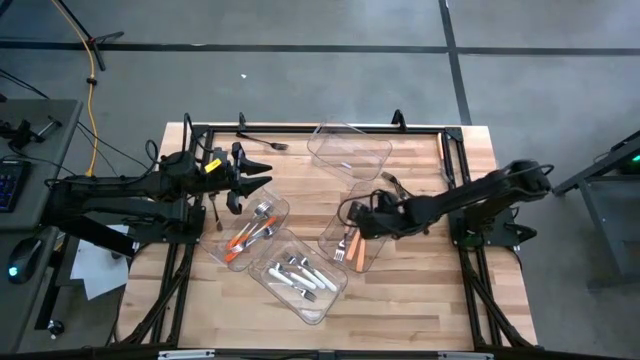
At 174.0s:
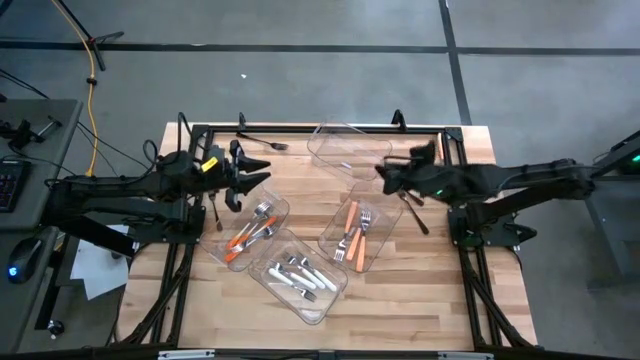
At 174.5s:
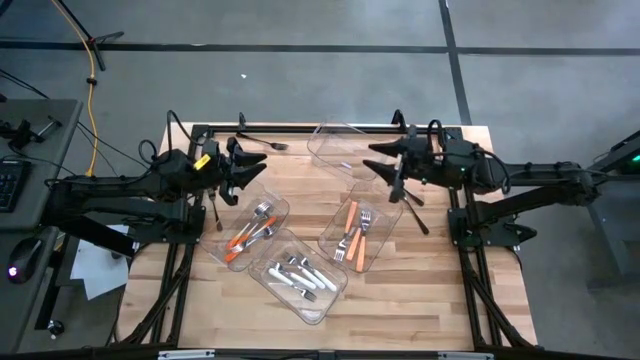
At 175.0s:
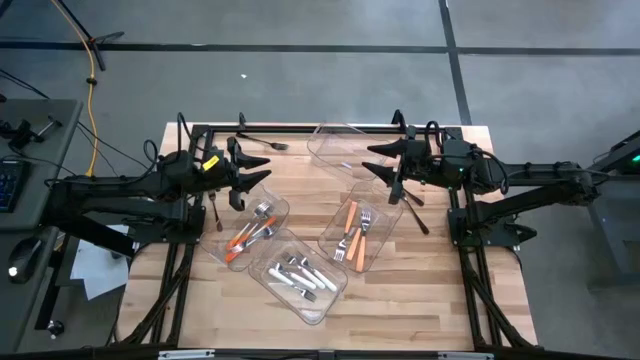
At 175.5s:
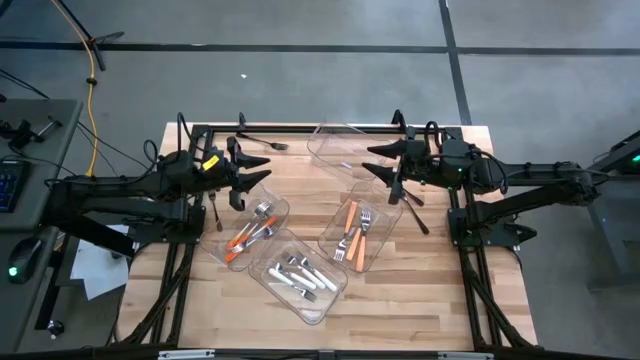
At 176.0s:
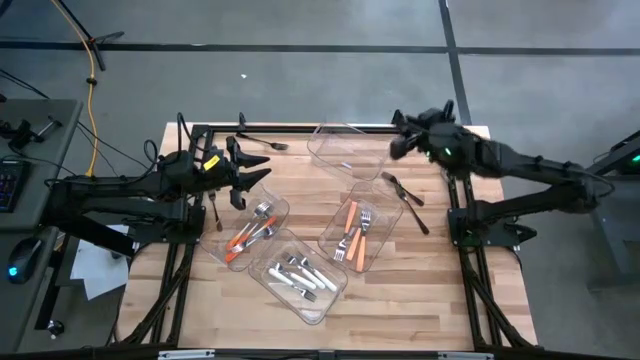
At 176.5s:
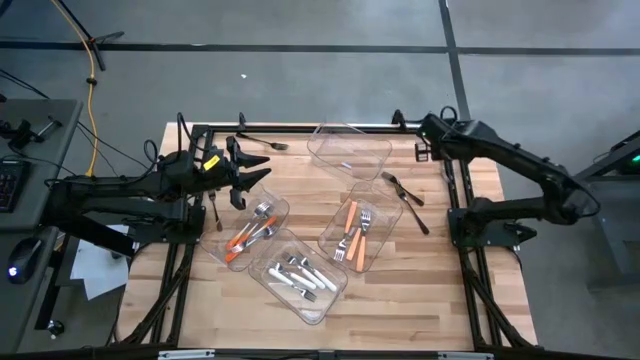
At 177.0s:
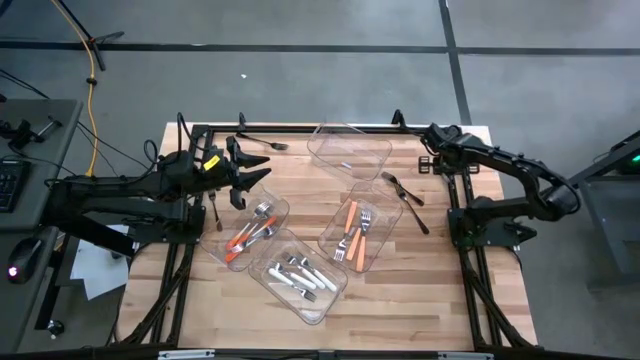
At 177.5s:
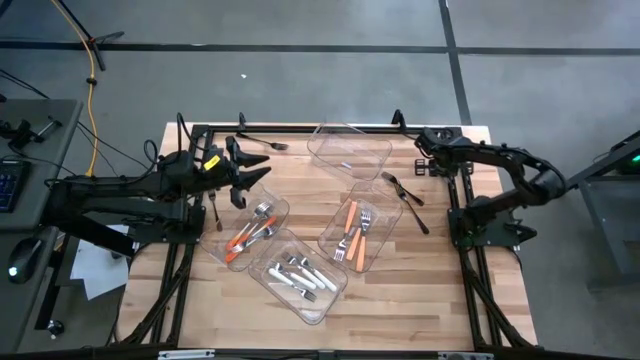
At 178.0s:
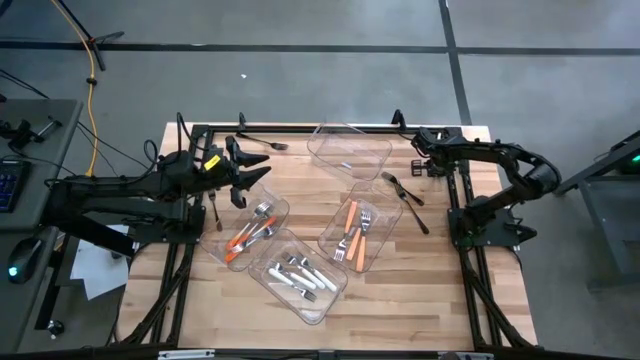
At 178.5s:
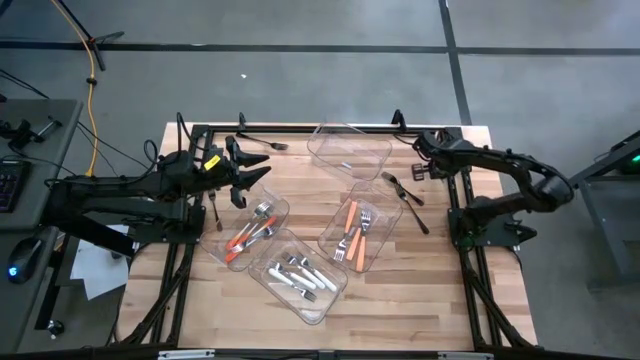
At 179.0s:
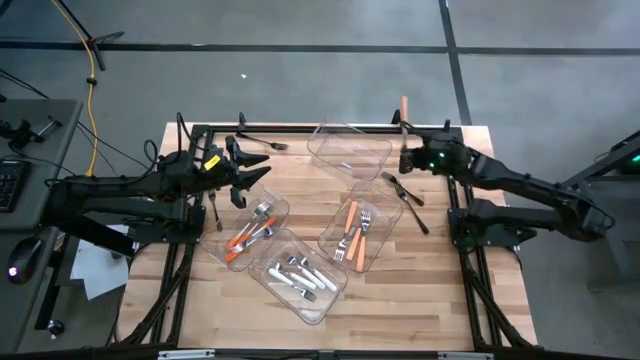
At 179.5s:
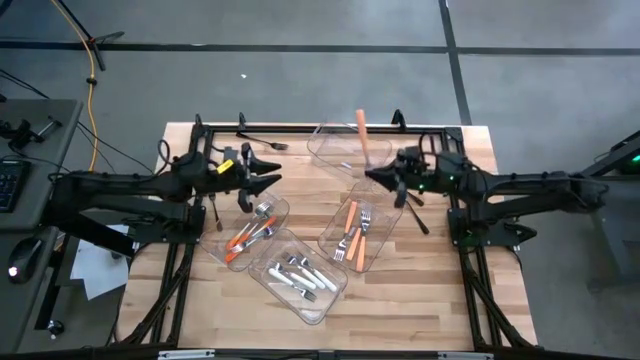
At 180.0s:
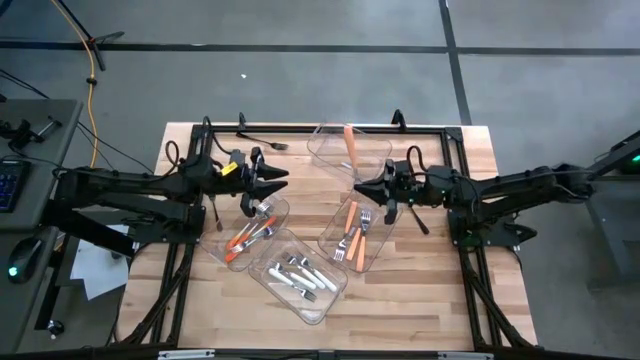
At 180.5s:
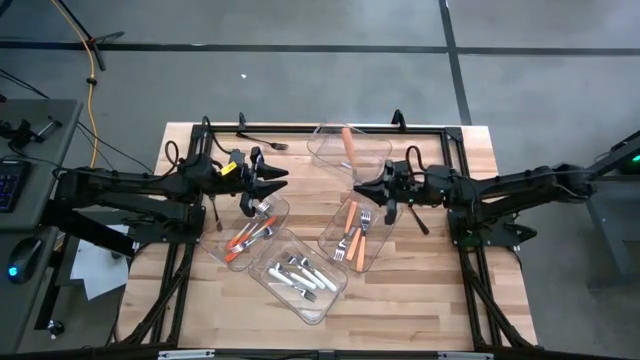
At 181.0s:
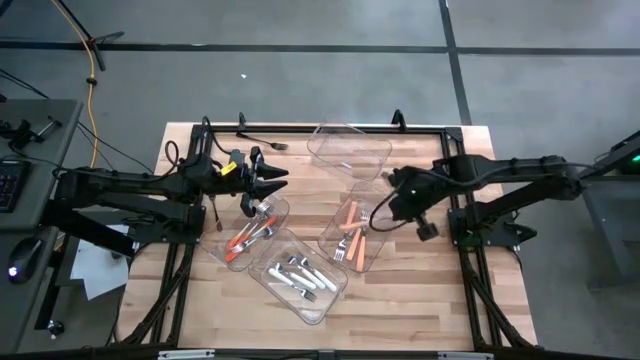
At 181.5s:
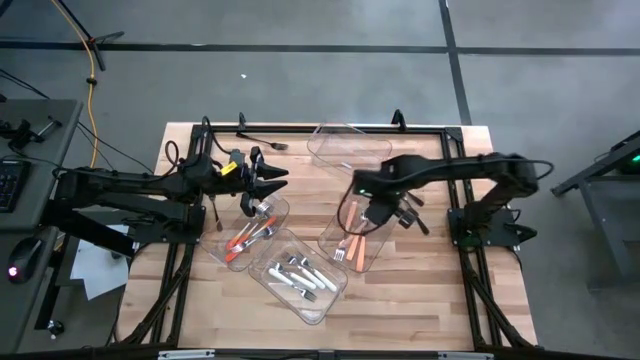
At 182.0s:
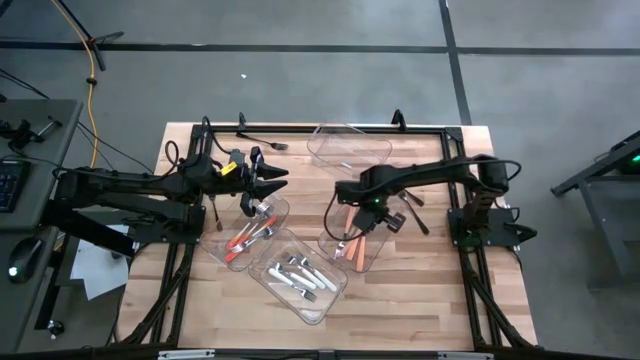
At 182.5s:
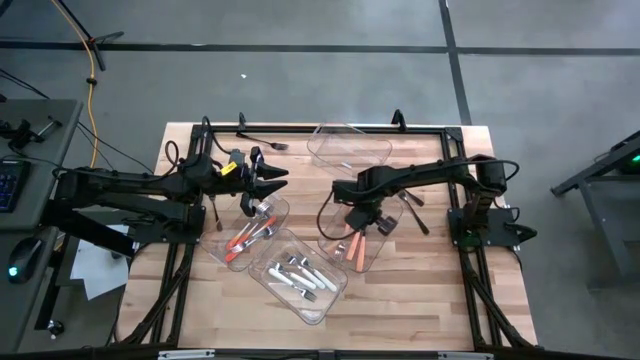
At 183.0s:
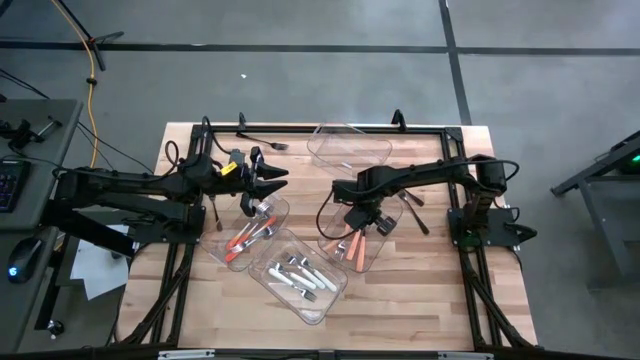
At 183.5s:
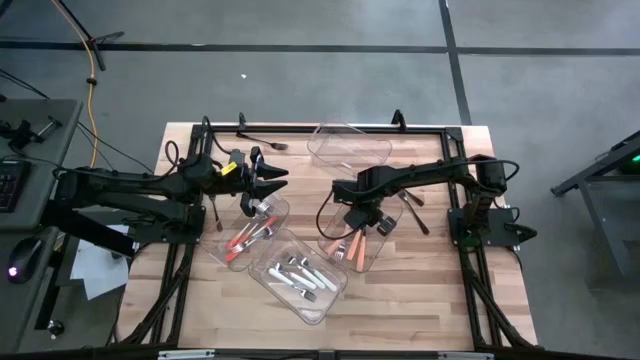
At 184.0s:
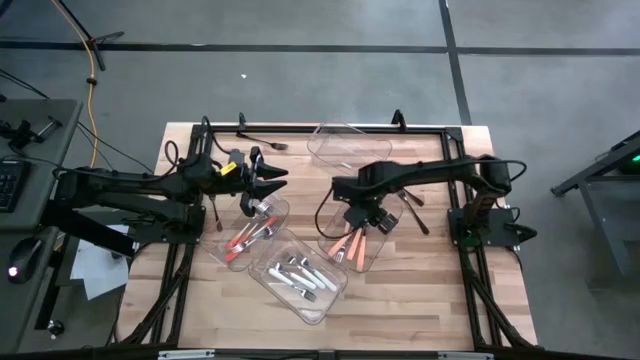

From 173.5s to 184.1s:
Task: Sort silverware by color (type)
Put the light orange fork into the middle right transparent bin

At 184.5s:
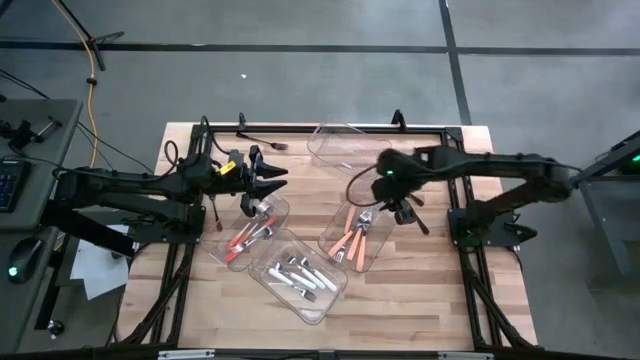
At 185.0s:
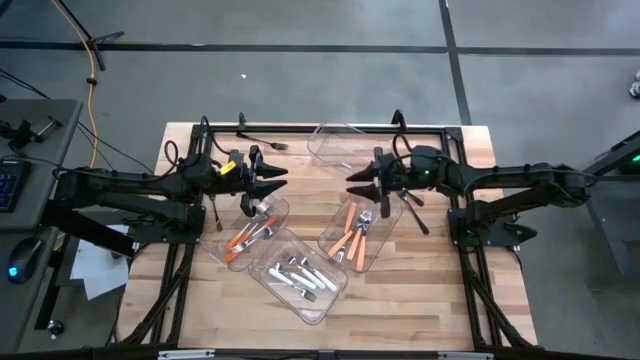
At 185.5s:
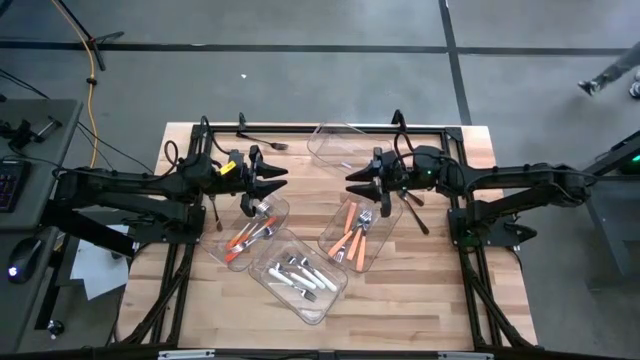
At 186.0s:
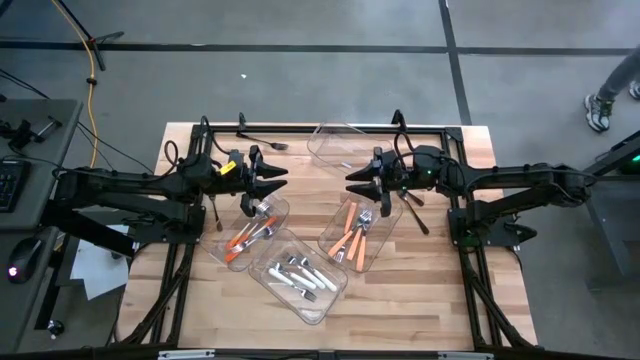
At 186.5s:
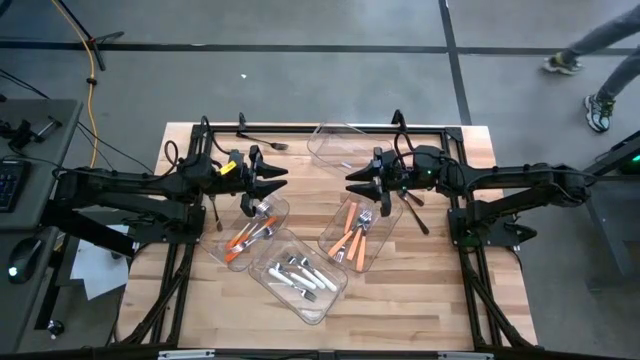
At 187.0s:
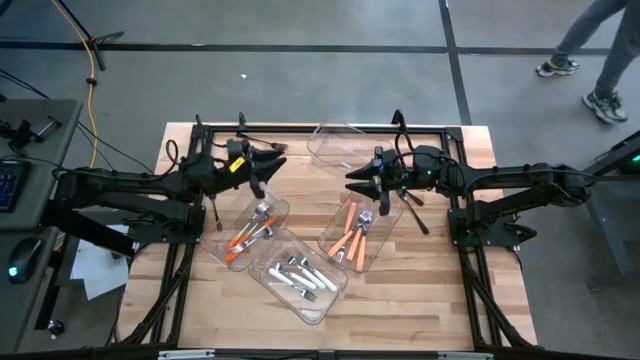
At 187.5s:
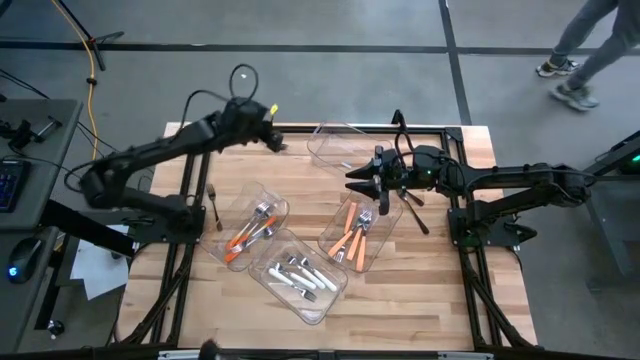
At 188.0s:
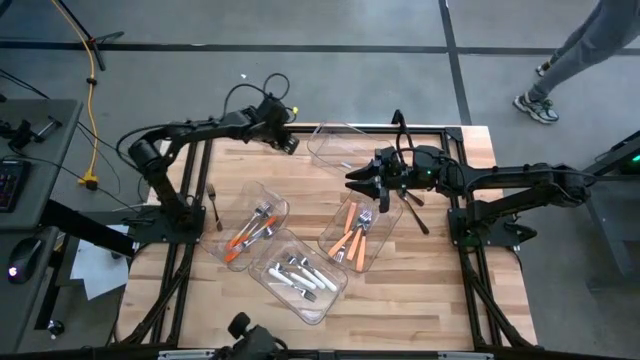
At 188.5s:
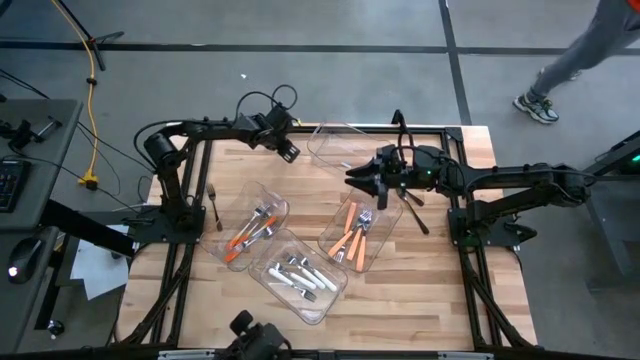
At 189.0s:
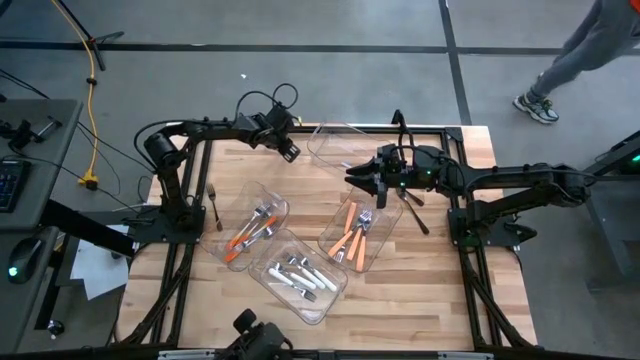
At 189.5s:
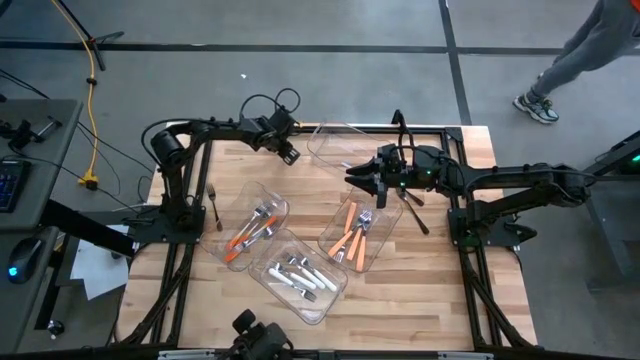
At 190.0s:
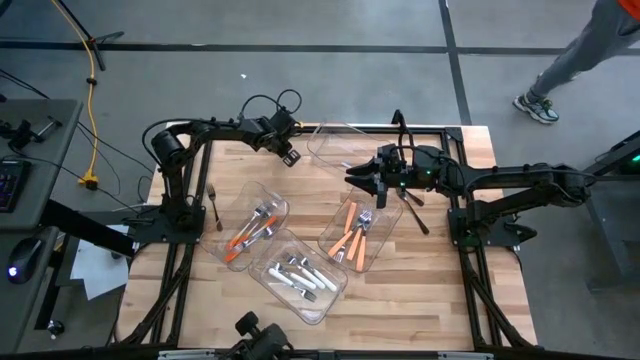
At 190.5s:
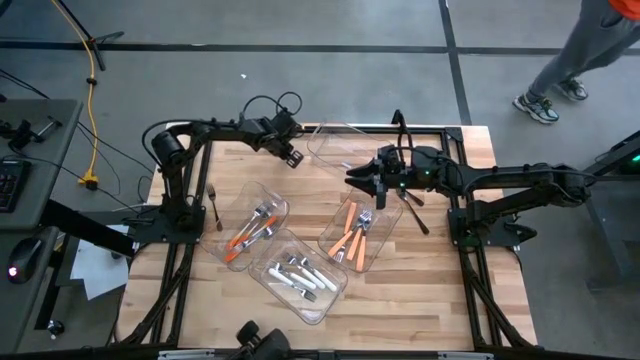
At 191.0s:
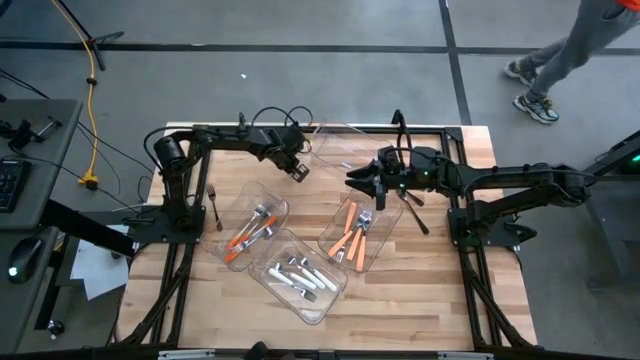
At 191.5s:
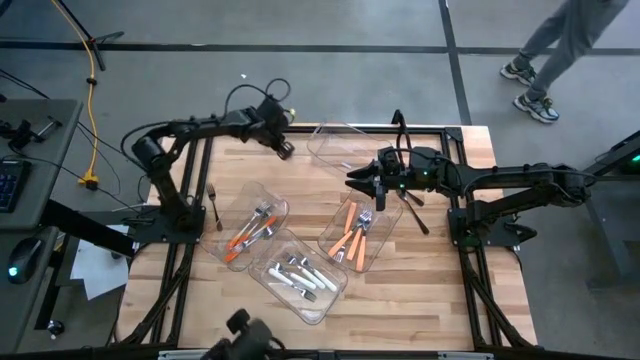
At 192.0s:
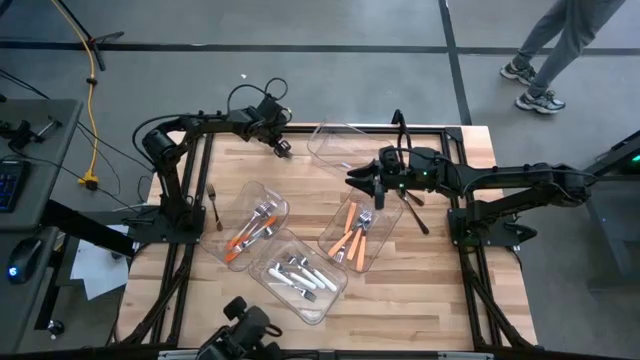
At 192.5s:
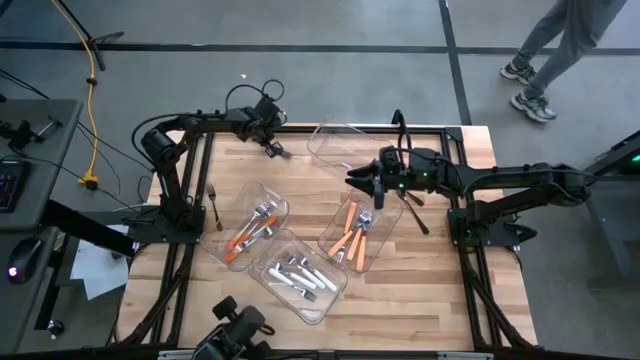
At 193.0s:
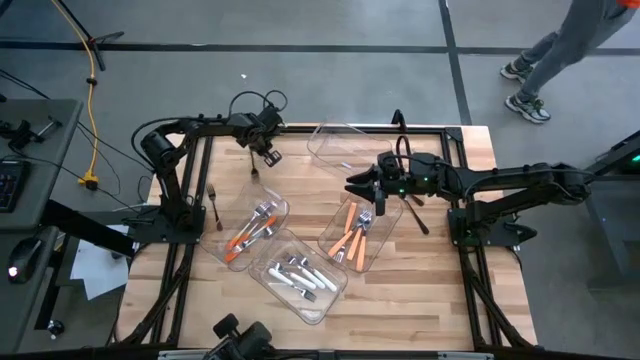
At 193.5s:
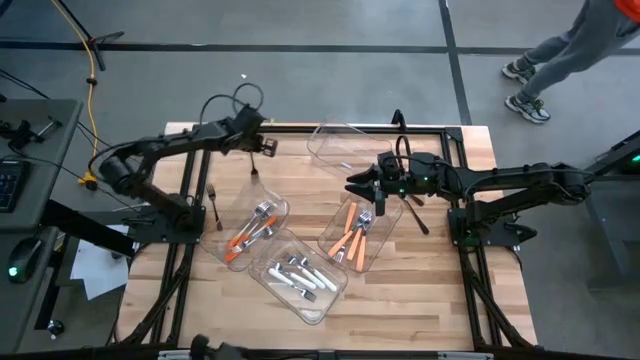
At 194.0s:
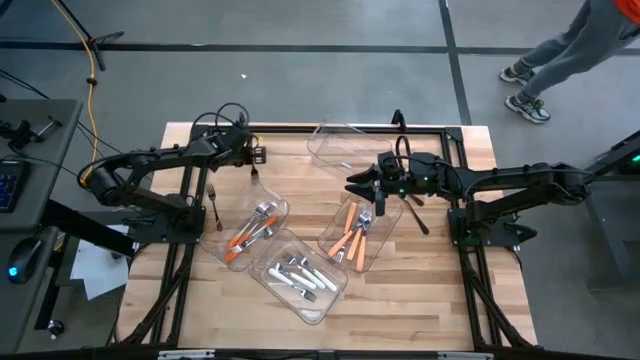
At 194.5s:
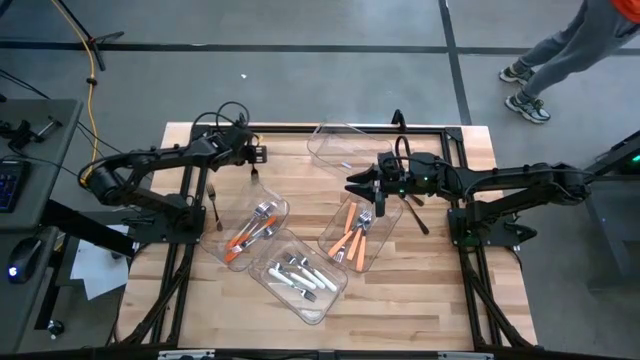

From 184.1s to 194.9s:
Put the black fork into the top transparent bin
